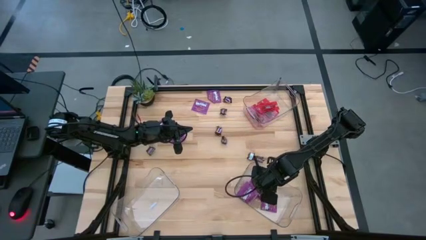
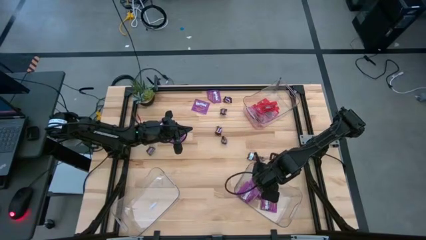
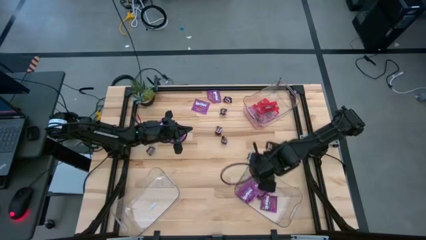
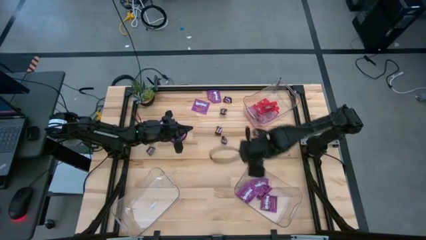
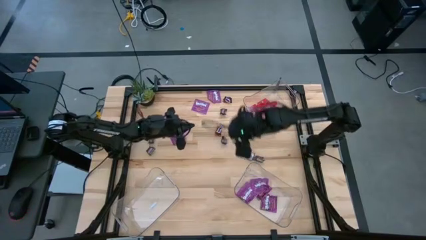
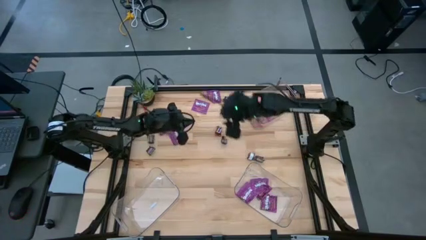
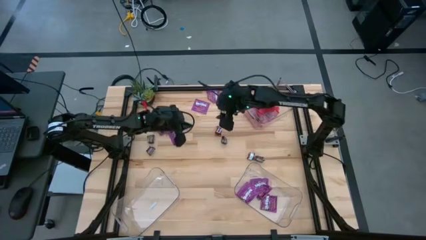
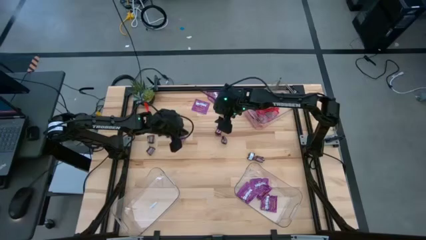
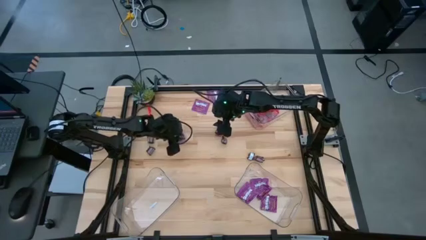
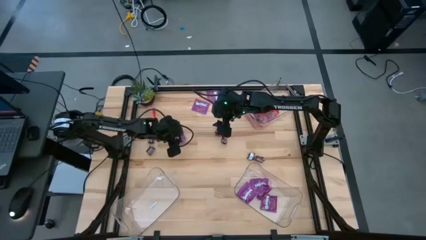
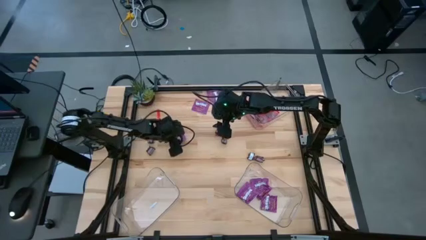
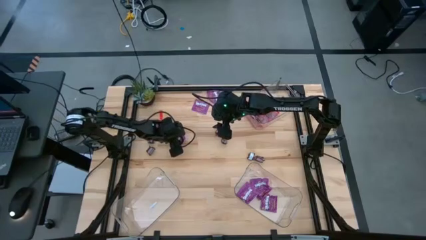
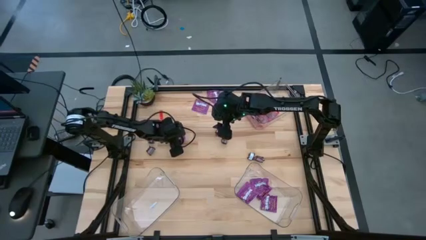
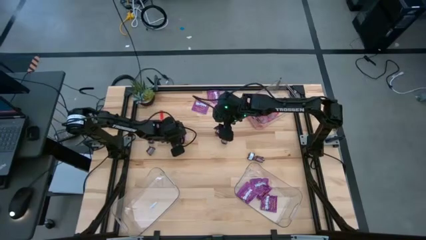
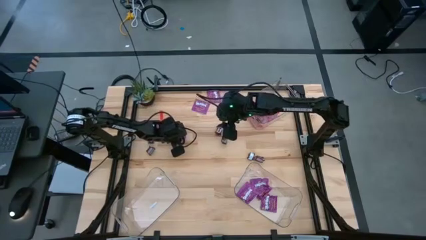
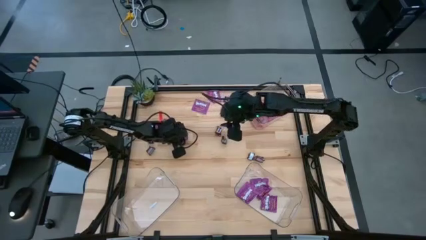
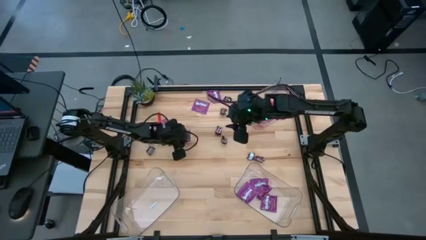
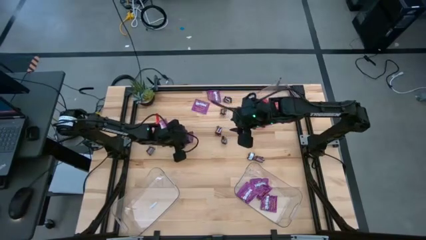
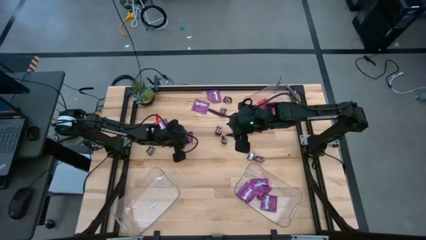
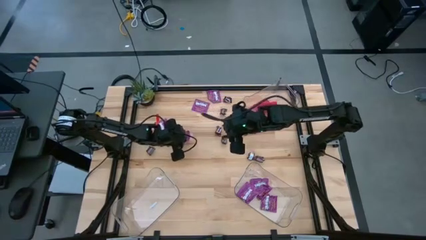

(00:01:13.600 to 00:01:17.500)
Task: Sort candy
Put the violet candy into the bottom right transparent bin

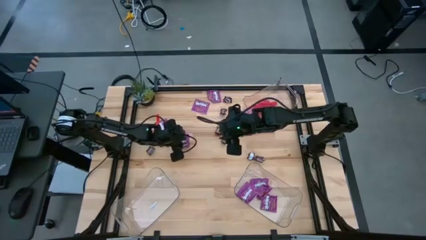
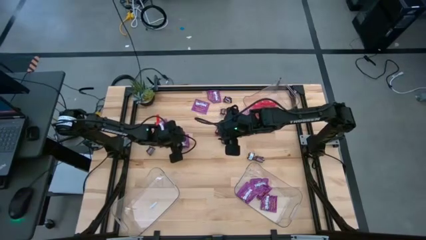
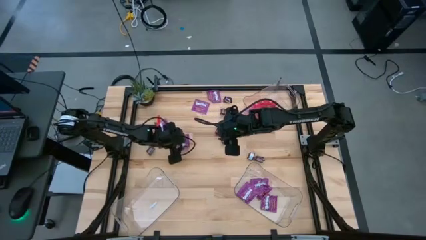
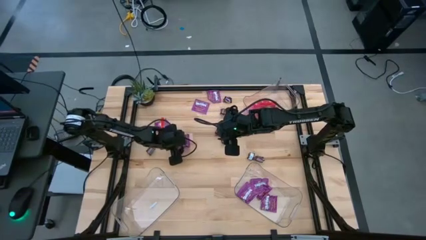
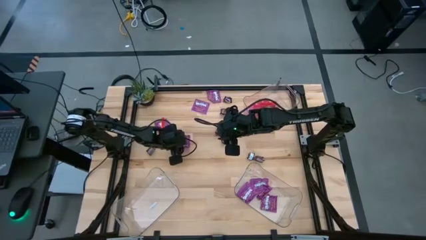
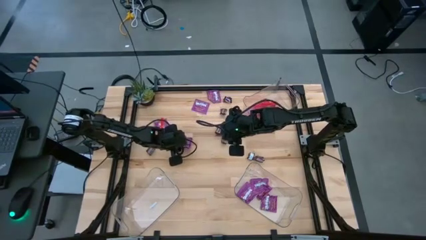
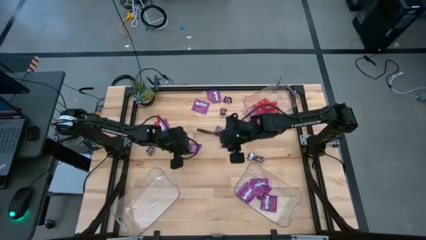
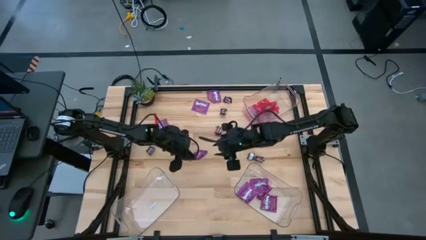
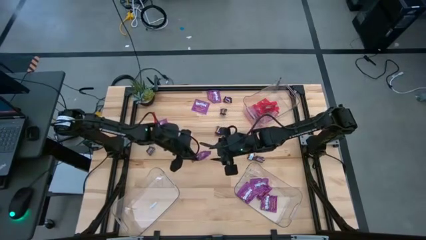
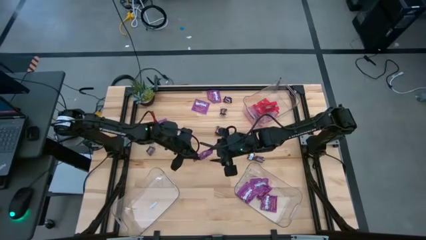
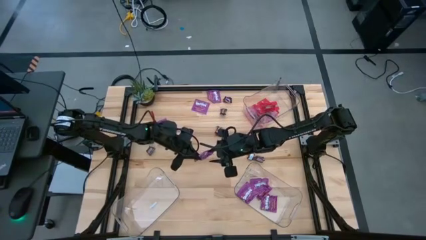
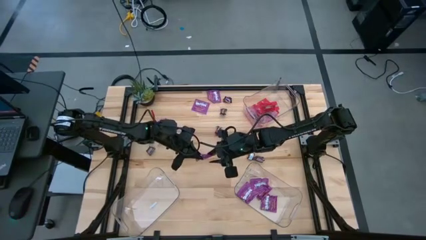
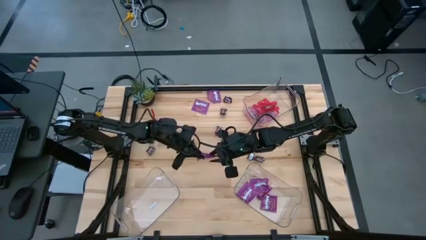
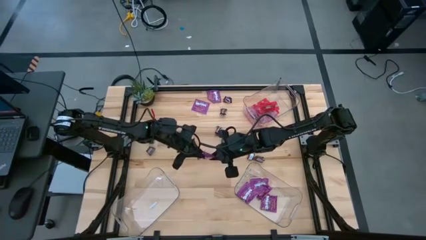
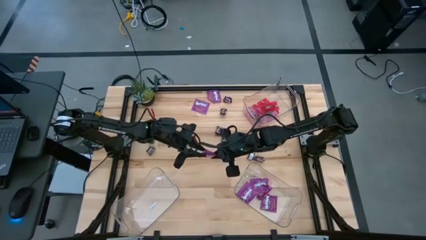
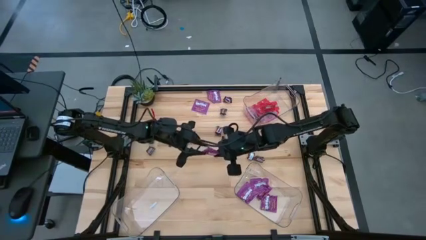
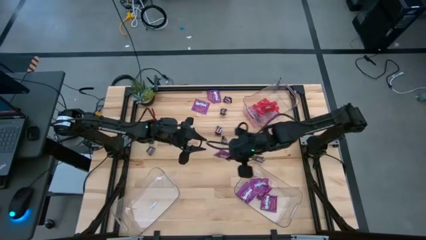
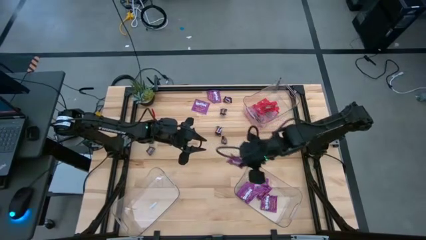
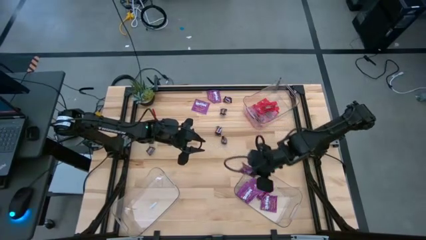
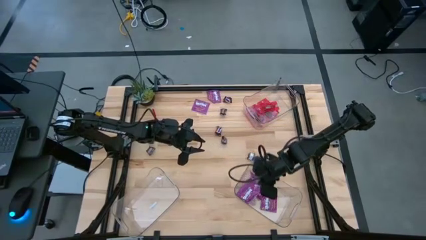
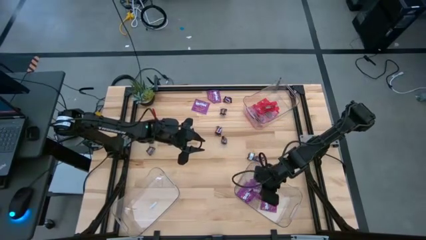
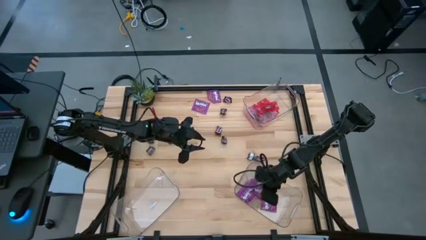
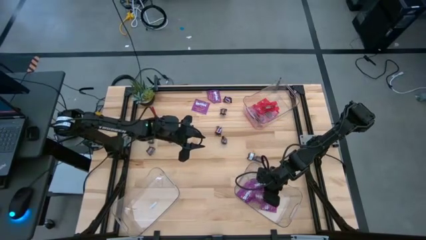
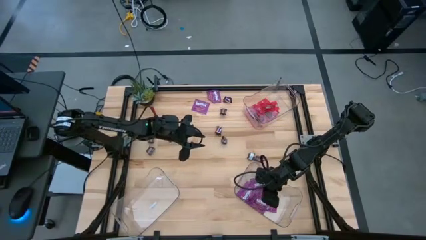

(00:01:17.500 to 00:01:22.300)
Put the violet candy into the bottom right transparent bin

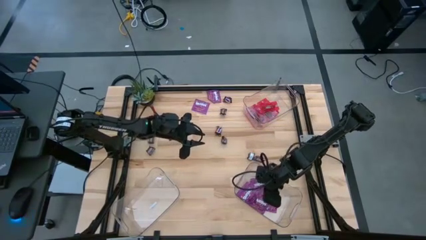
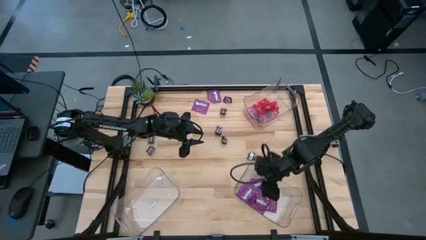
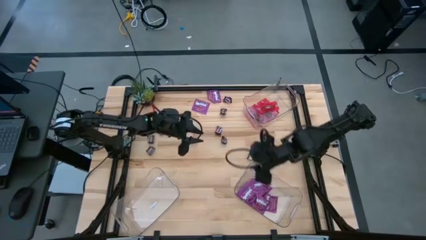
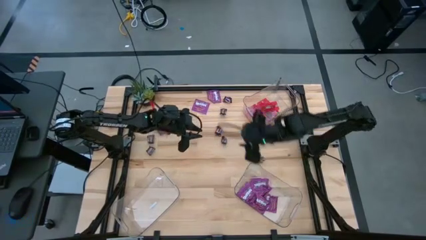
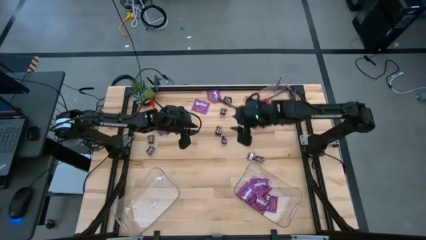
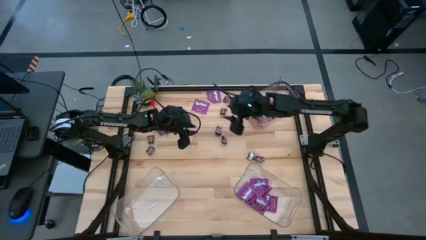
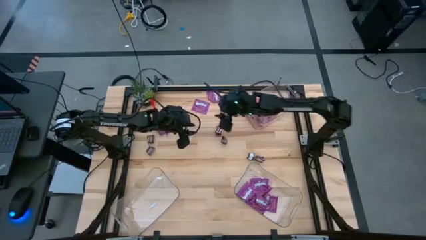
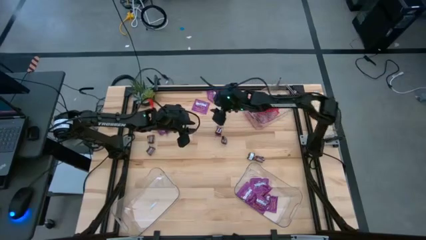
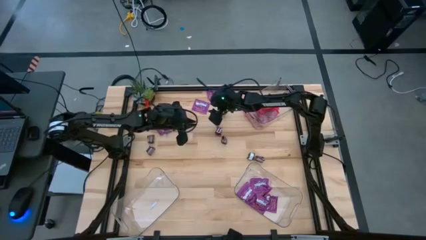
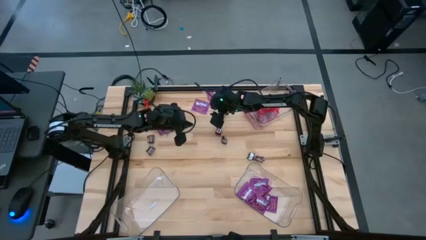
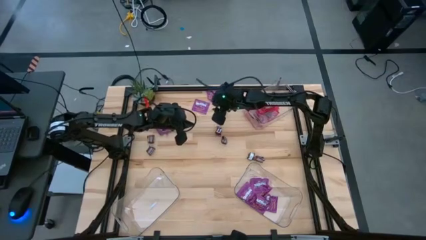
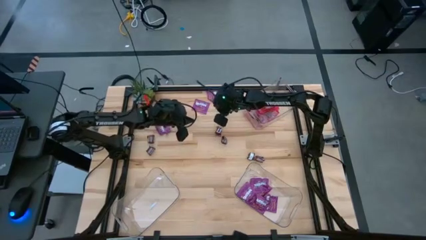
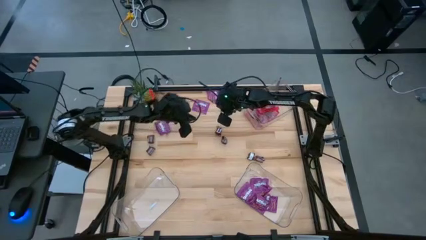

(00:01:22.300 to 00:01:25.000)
Put the violet candy into the bottom right transparent bin

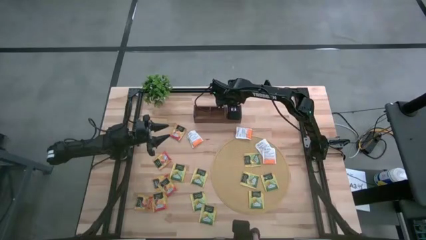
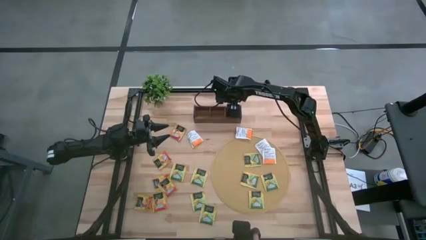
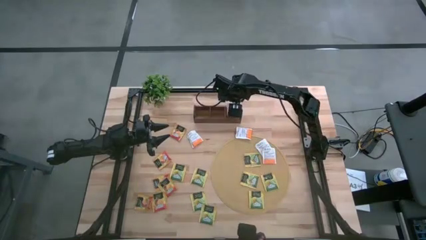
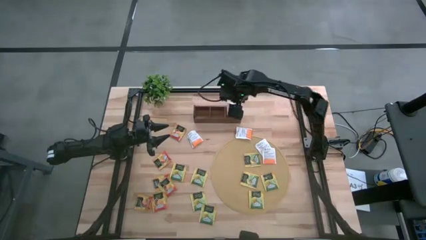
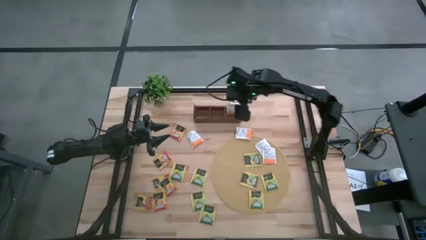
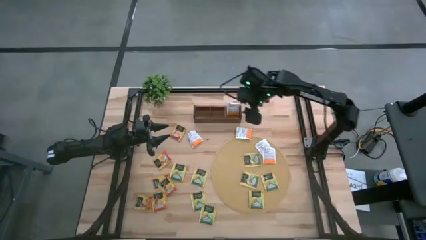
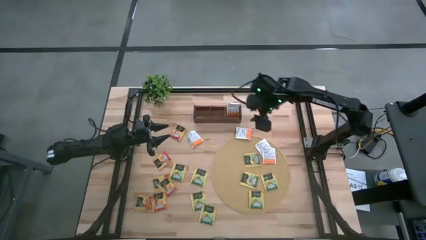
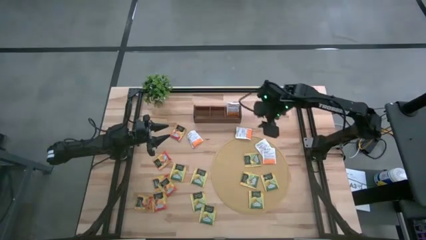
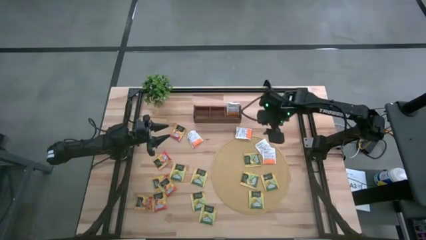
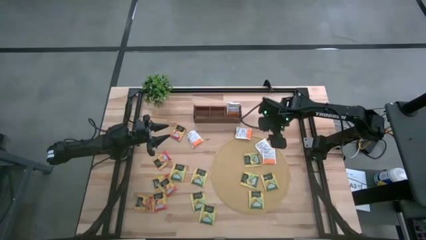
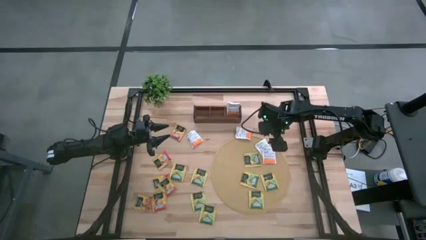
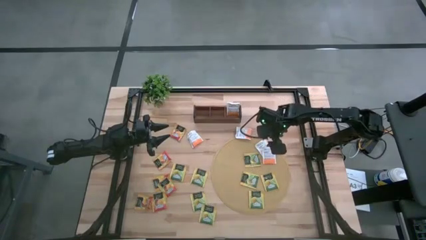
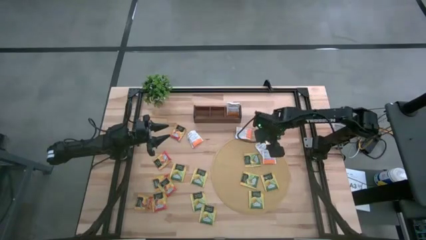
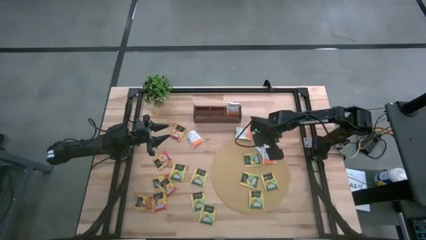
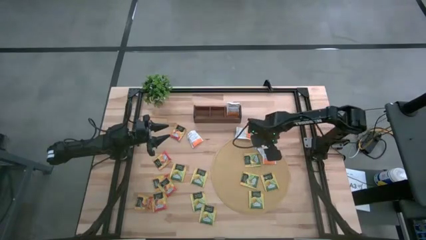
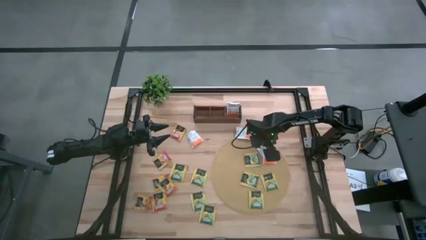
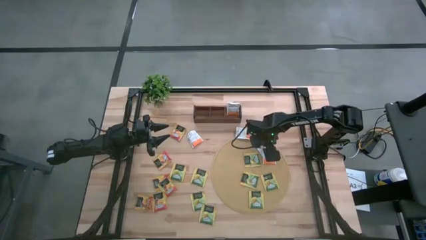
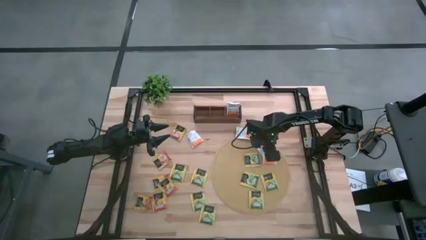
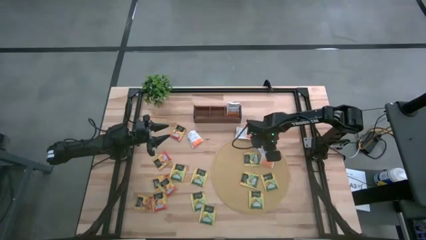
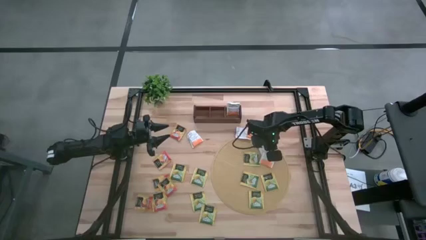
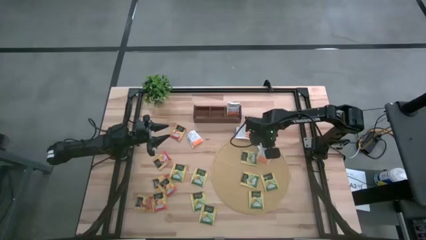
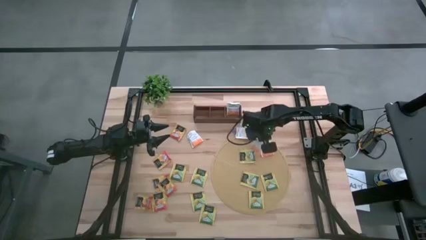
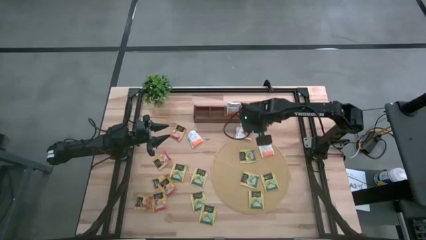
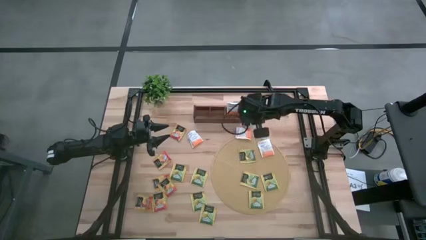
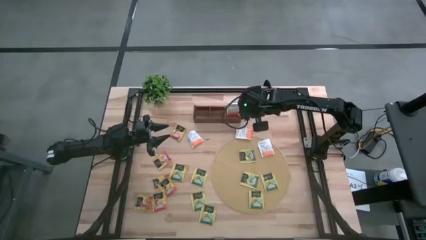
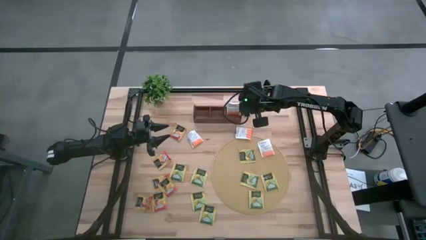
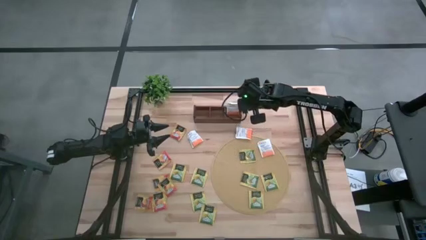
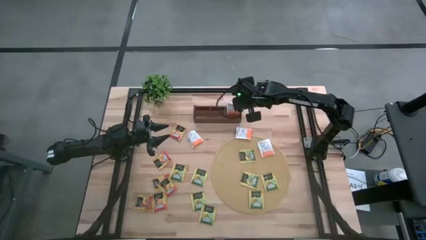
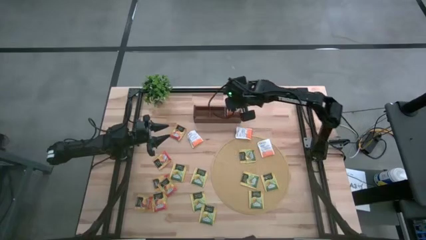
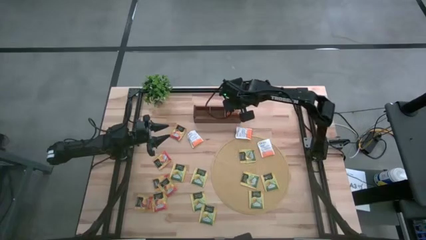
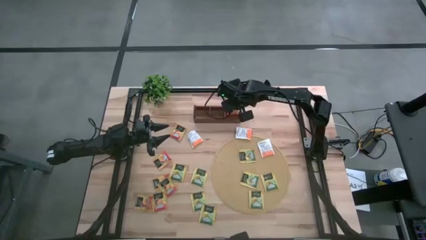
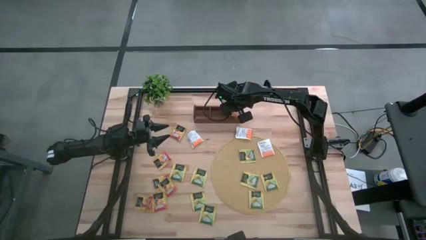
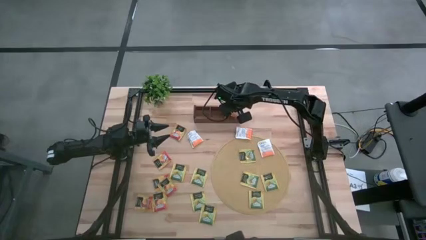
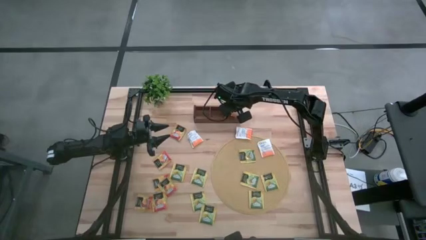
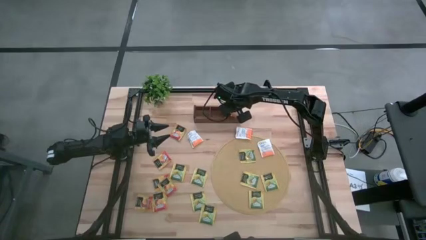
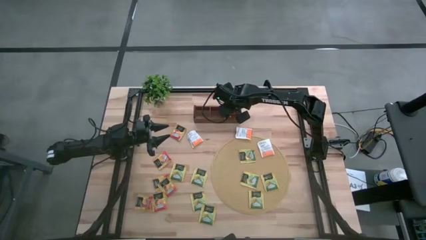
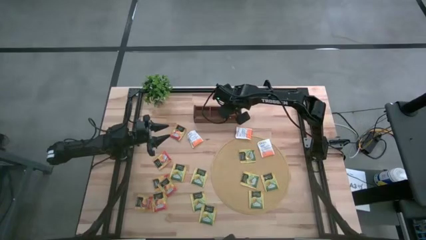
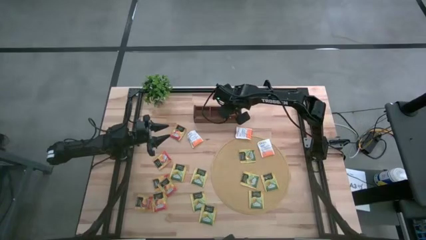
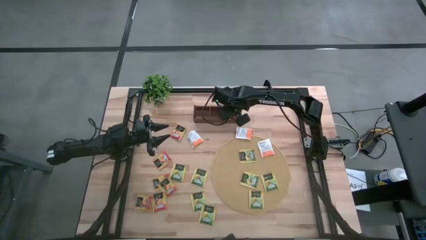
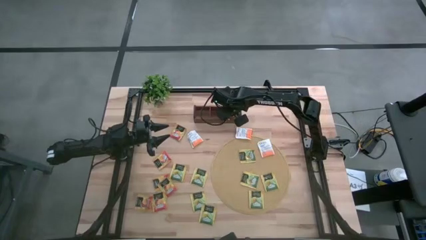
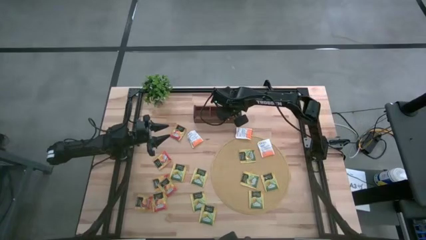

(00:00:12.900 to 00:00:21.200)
Task: Pick & Place Tea
Put the white tea bag into the right section of the wooden organizer
